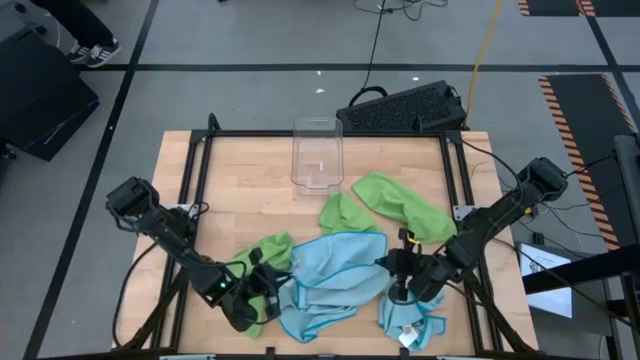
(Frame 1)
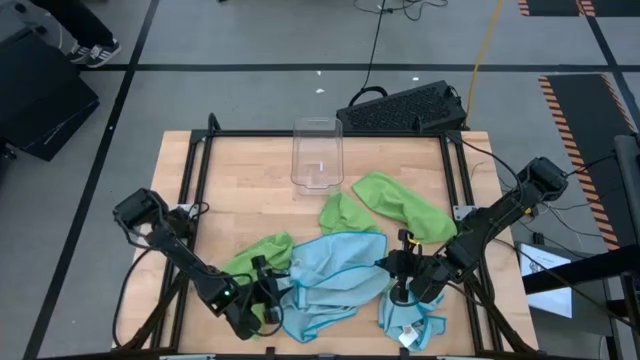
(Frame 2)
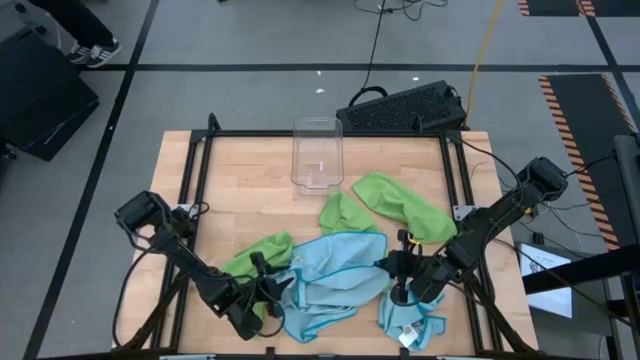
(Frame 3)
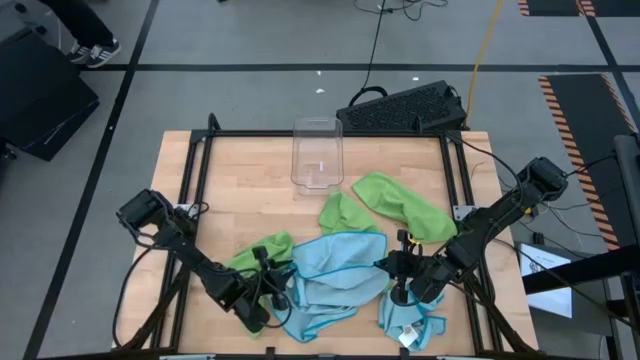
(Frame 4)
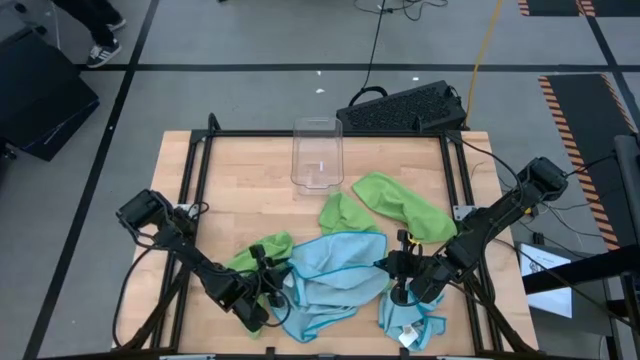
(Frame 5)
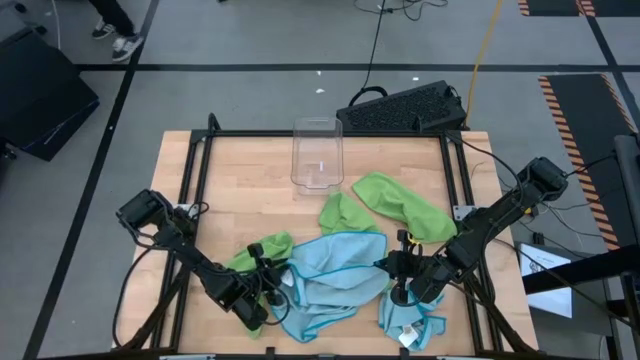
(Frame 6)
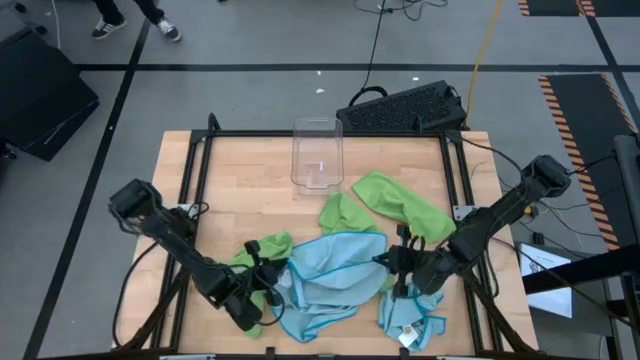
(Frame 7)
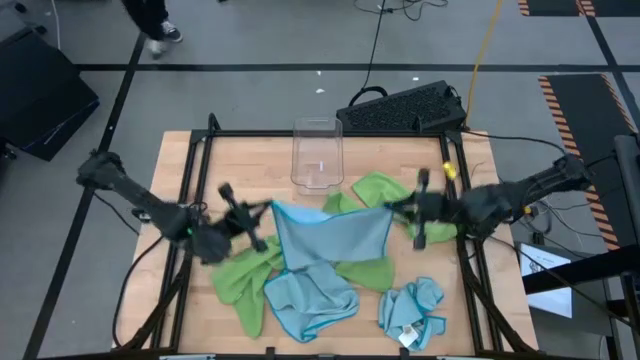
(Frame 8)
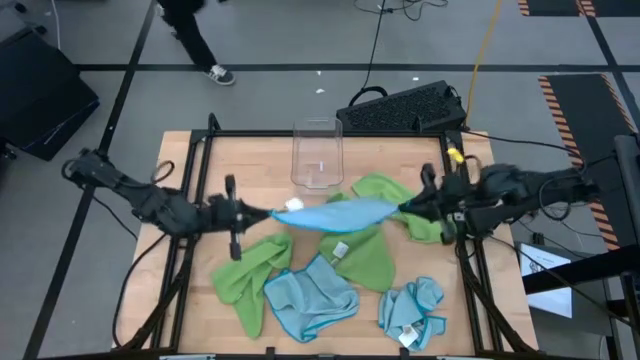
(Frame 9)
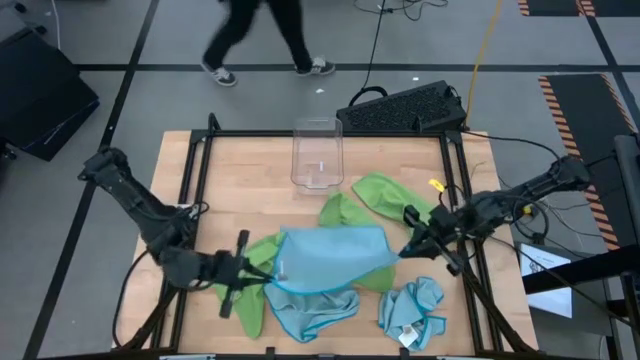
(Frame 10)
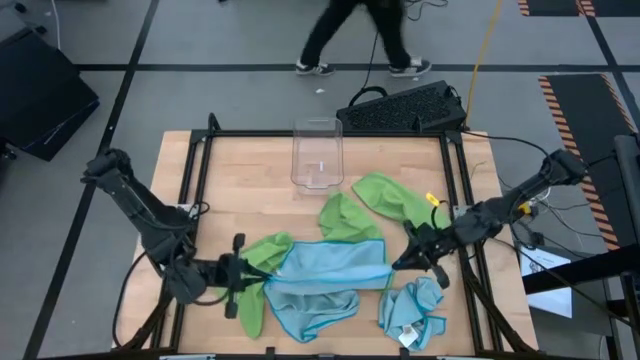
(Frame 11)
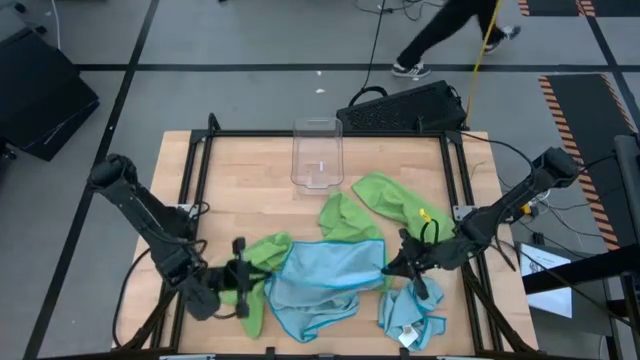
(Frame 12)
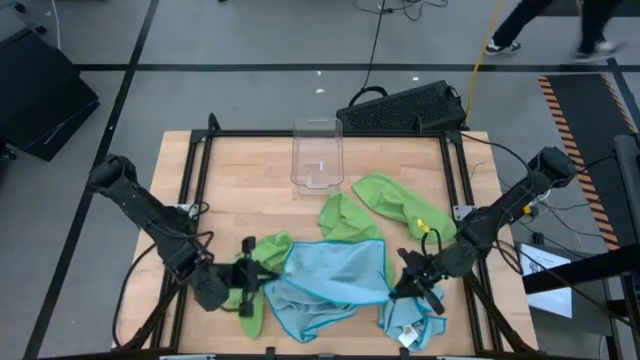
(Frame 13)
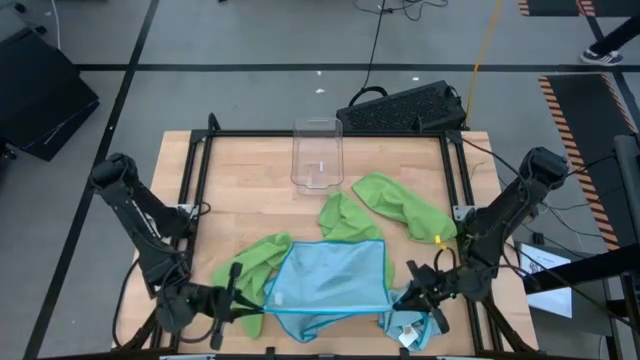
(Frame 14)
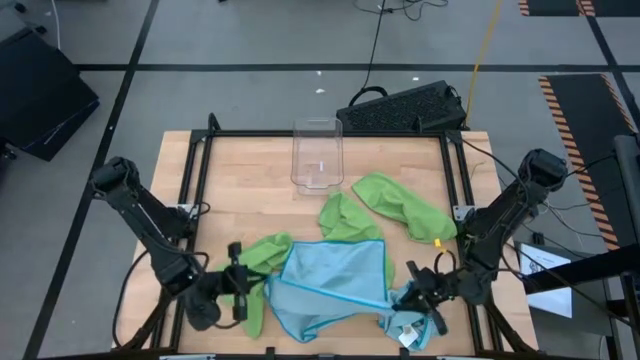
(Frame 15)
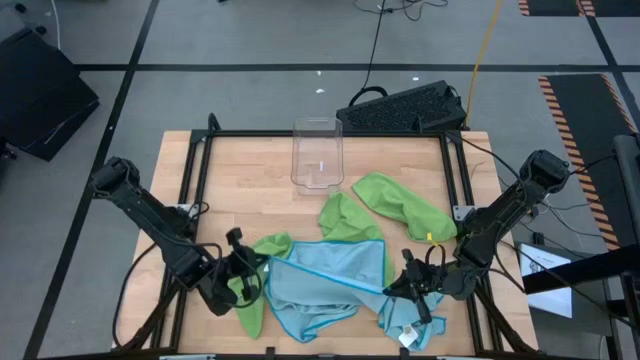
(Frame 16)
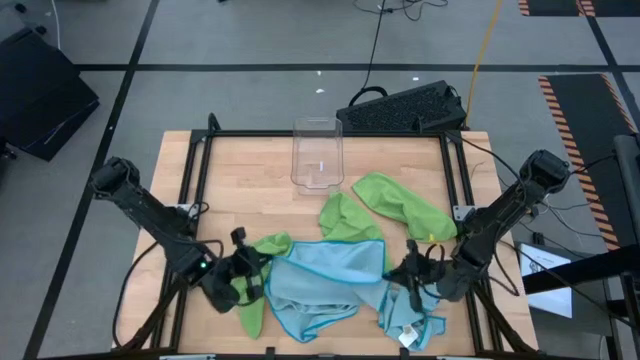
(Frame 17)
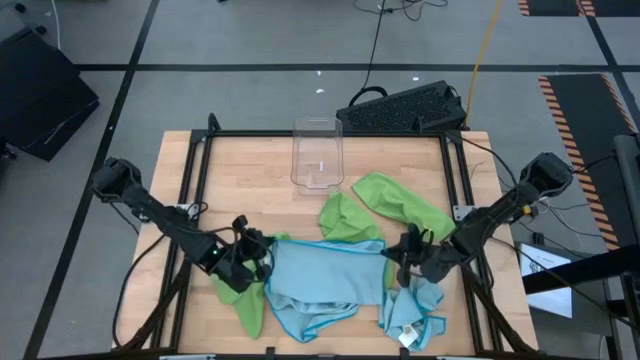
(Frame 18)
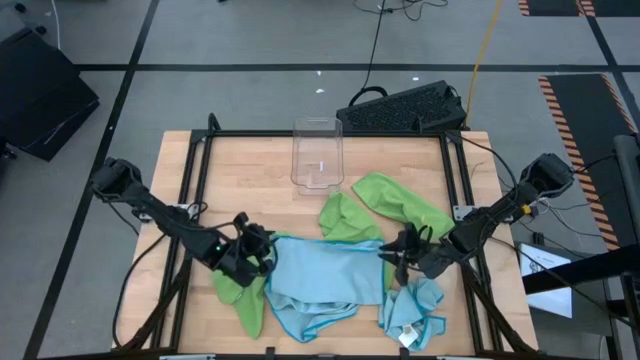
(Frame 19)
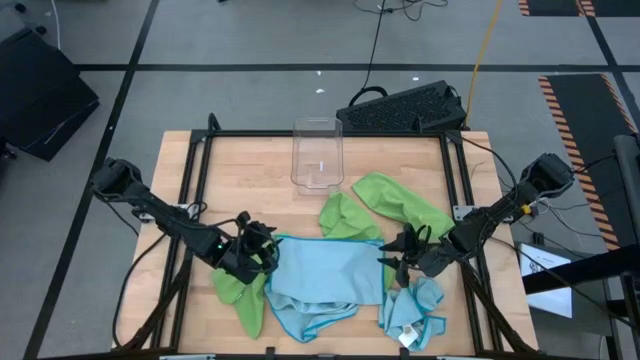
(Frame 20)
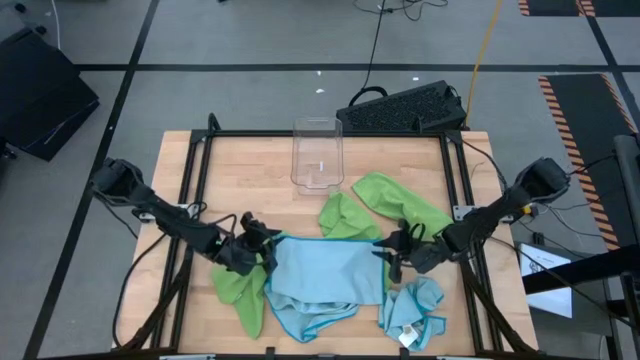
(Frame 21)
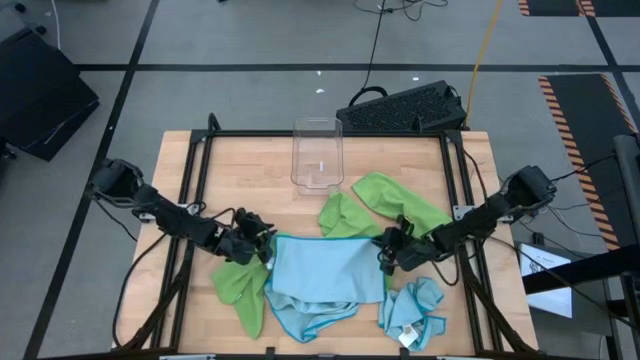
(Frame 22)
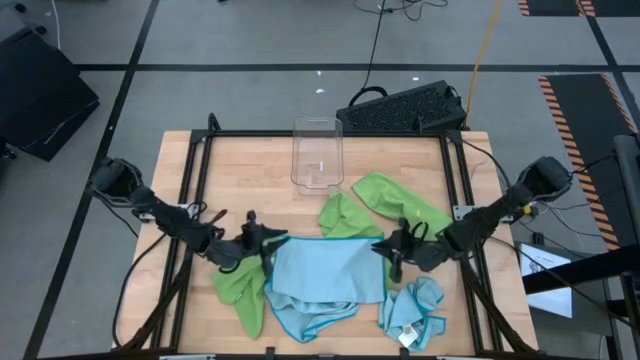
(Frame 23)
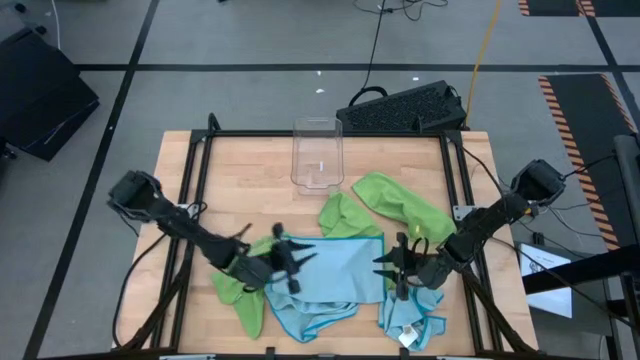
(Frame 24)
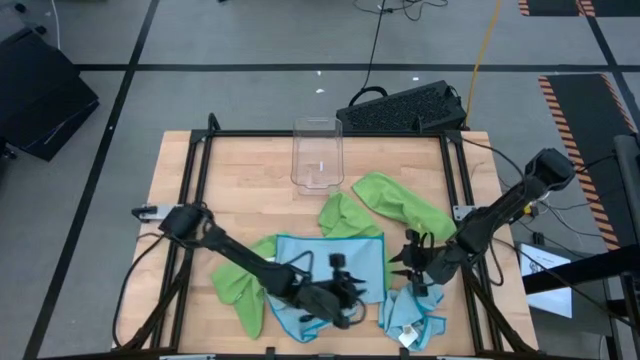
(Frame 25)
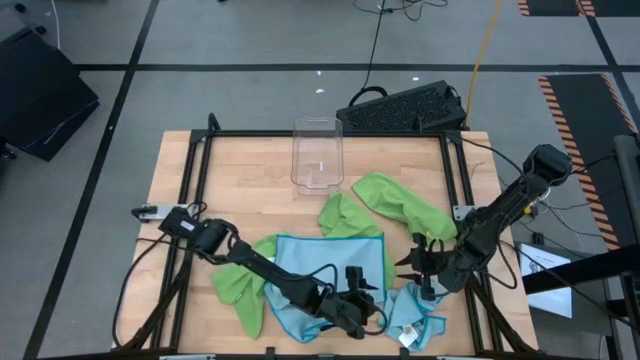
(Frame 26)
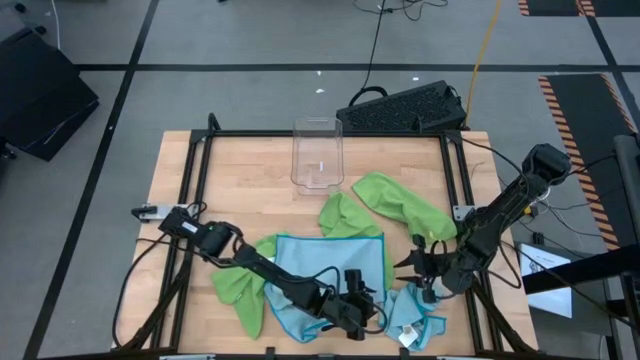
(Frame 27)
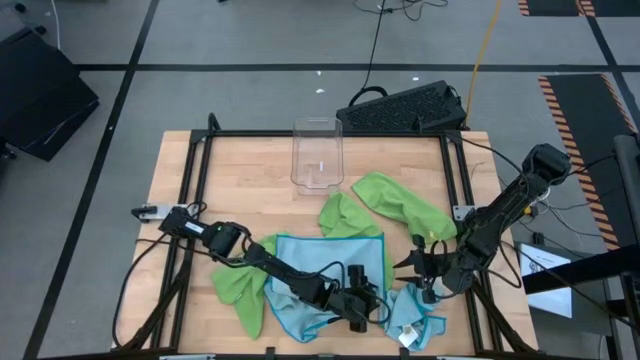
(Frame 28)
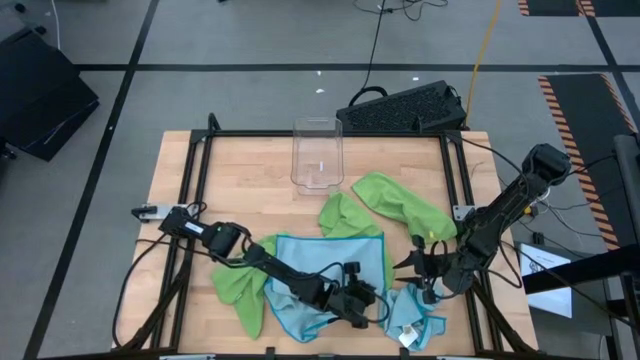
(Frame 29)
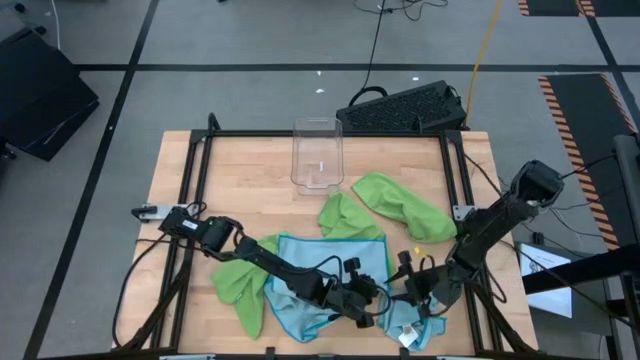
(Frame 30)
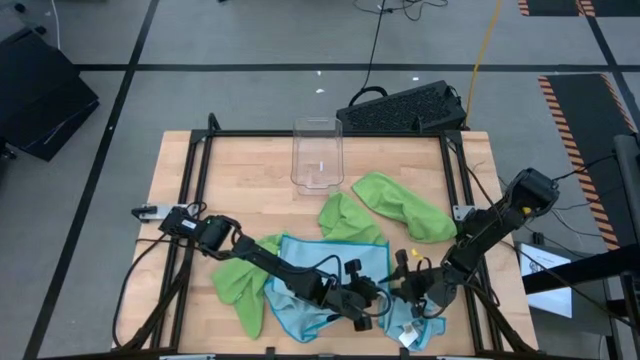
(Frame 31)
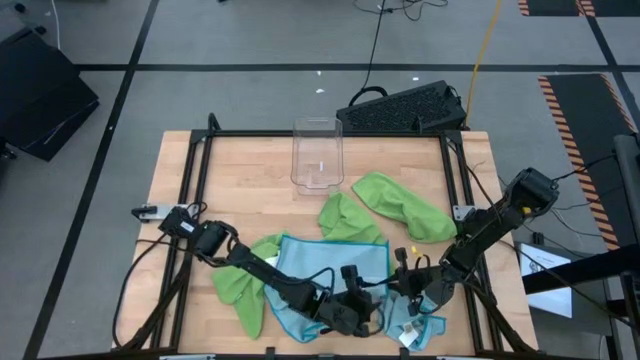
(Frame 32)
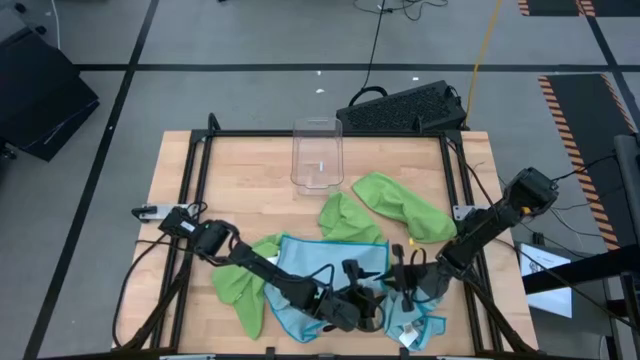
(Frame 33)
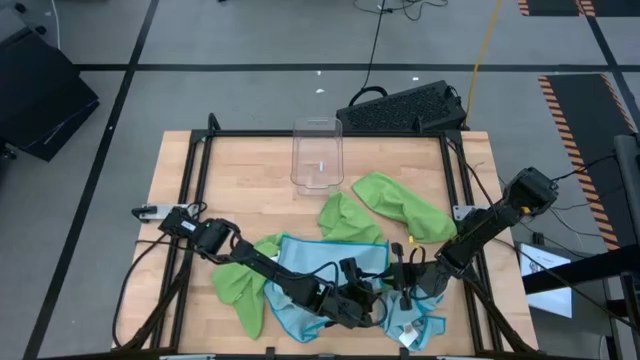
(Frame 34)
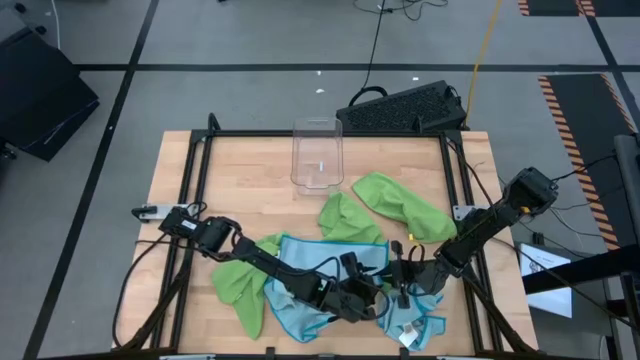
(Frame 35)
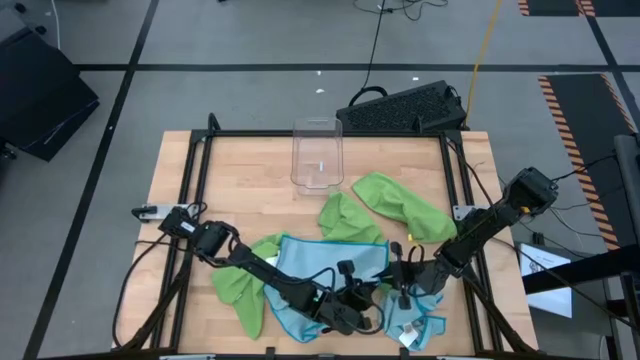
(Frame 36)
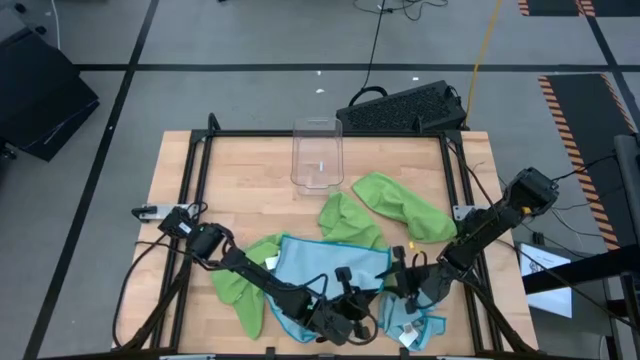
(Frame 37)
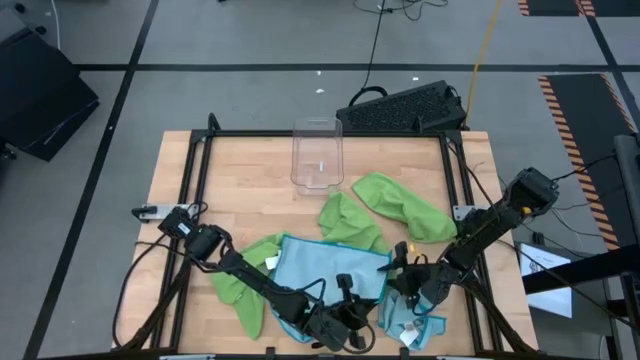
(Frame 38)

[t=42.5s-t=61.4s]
Task: Fold microfiber towels
Fold the top left blue towel
